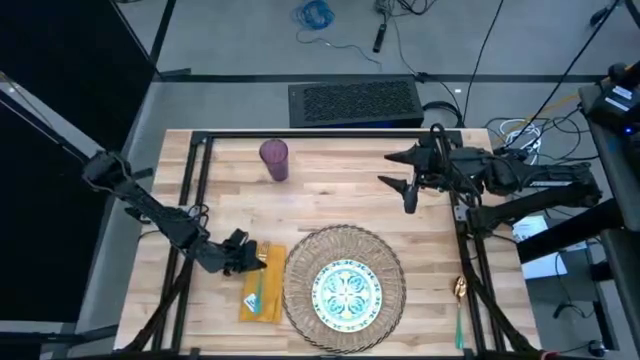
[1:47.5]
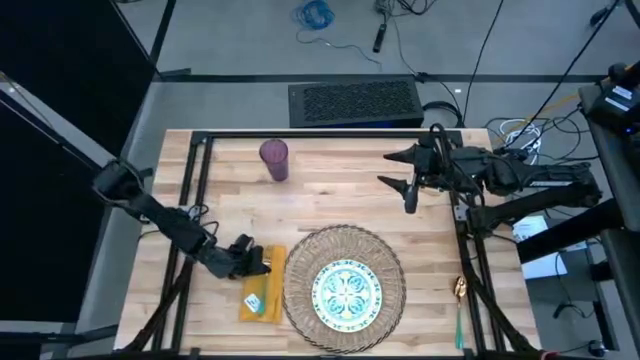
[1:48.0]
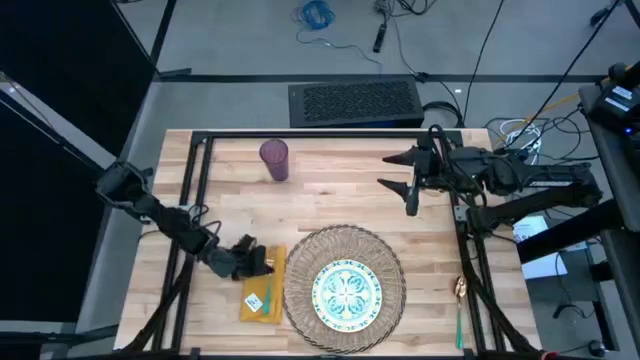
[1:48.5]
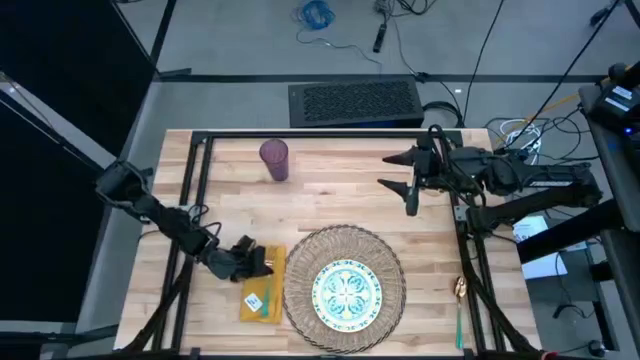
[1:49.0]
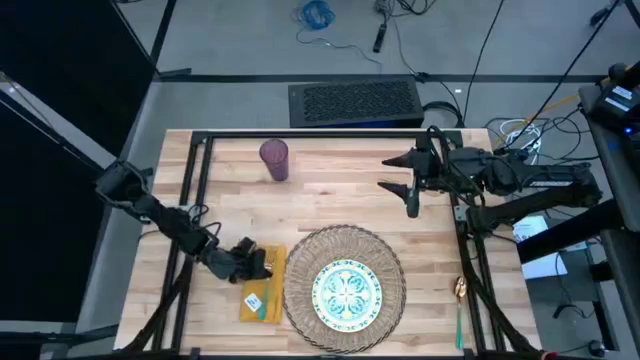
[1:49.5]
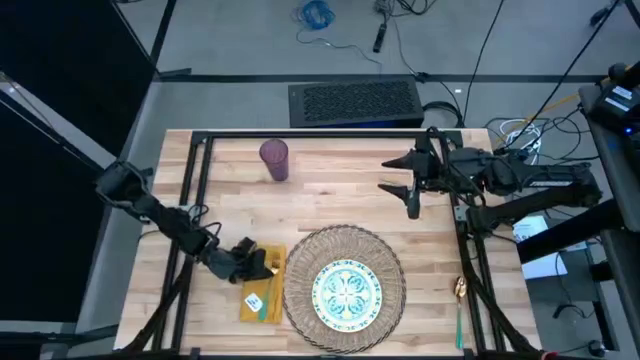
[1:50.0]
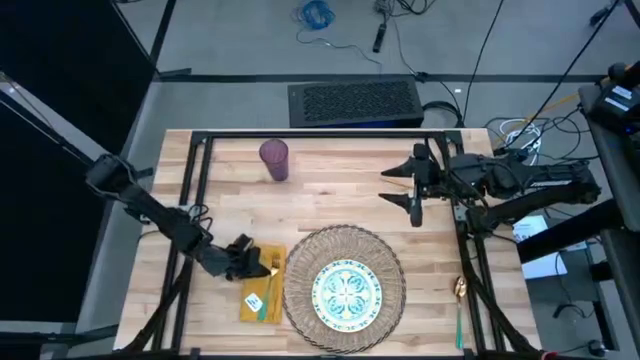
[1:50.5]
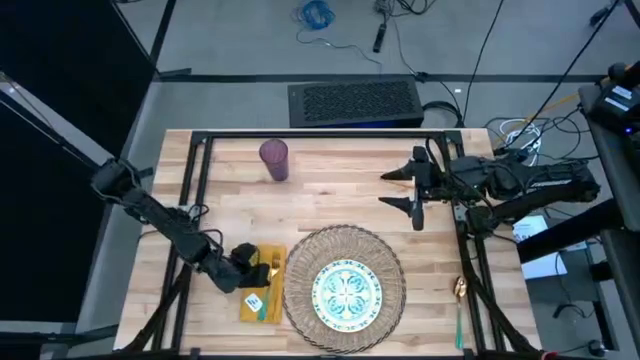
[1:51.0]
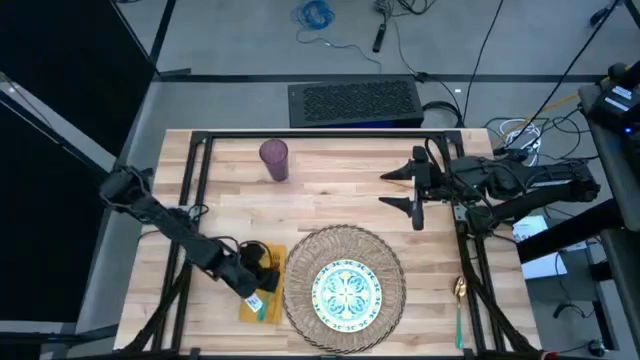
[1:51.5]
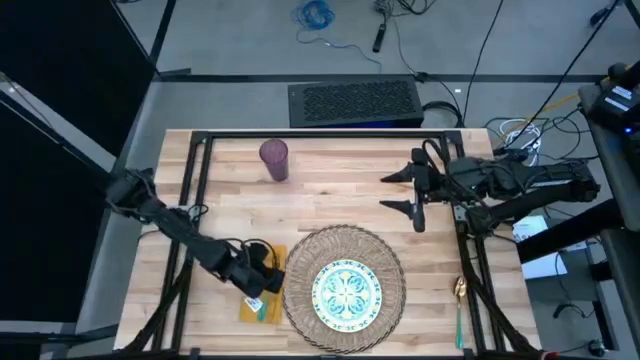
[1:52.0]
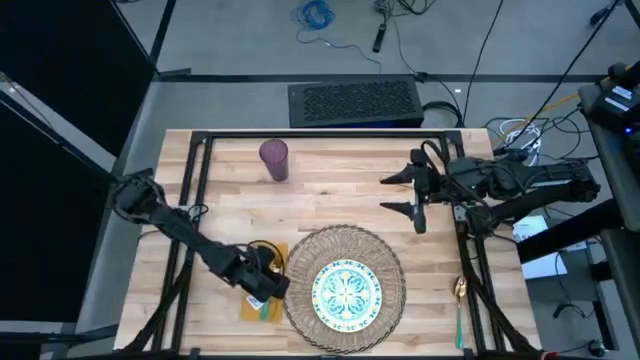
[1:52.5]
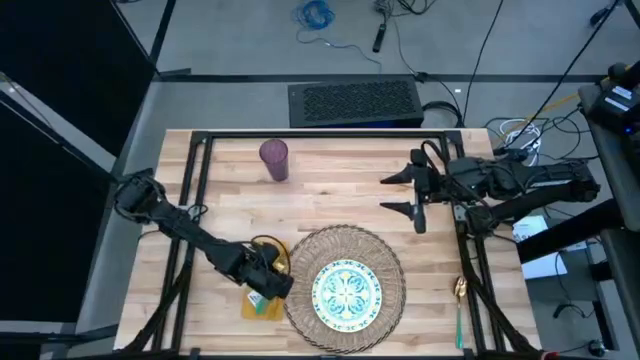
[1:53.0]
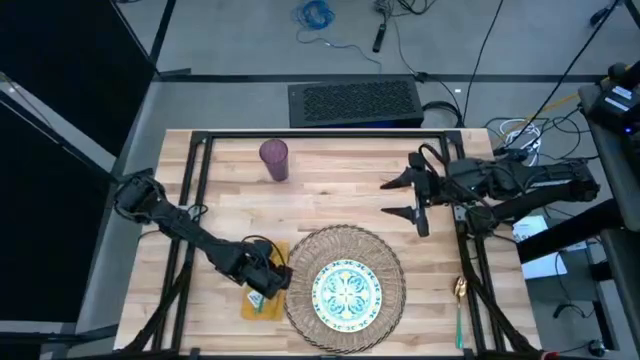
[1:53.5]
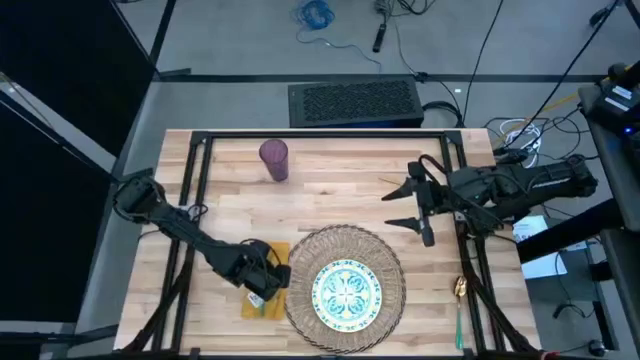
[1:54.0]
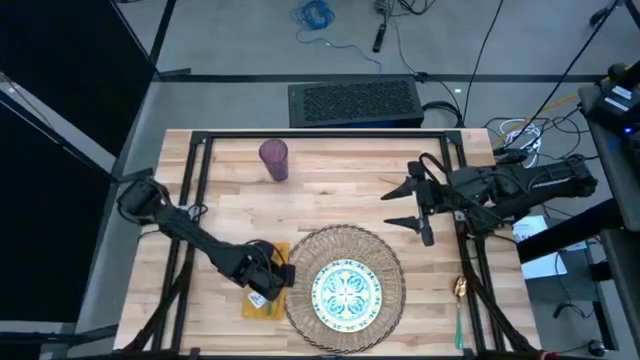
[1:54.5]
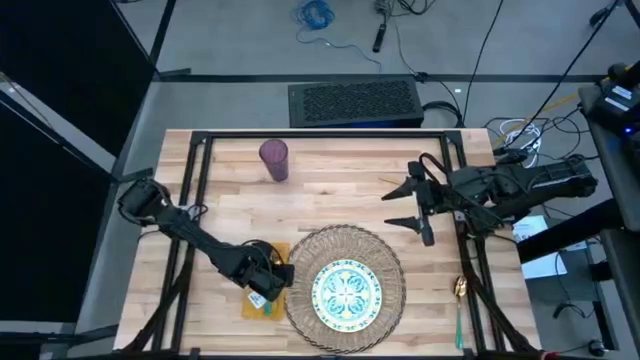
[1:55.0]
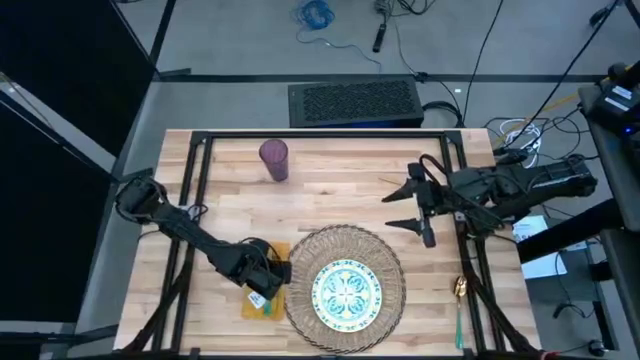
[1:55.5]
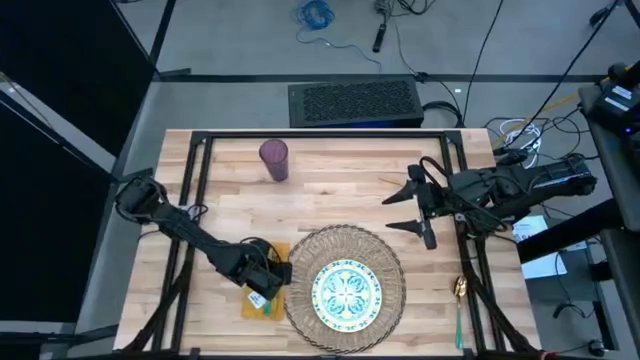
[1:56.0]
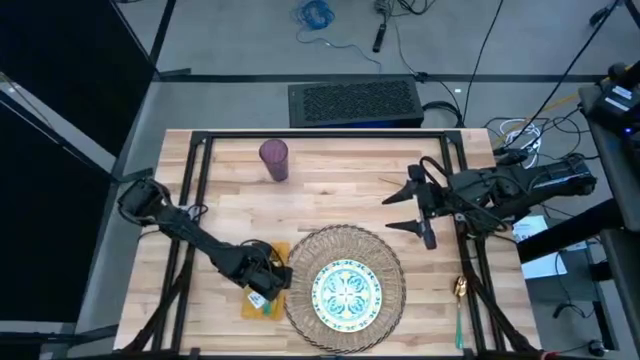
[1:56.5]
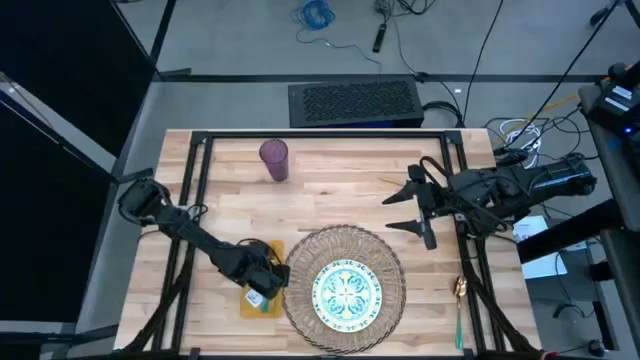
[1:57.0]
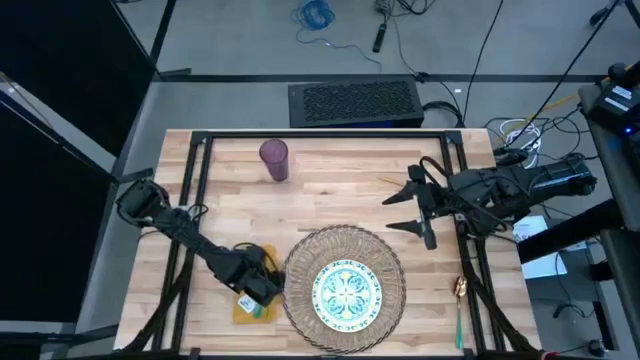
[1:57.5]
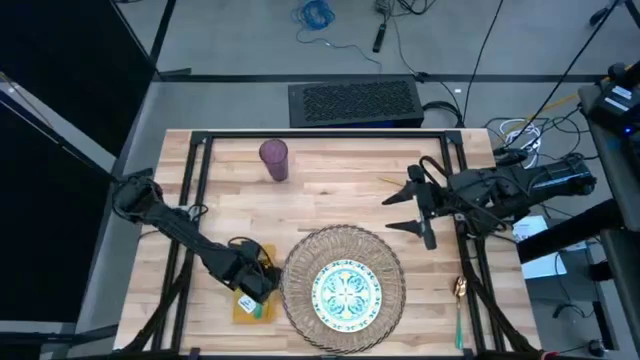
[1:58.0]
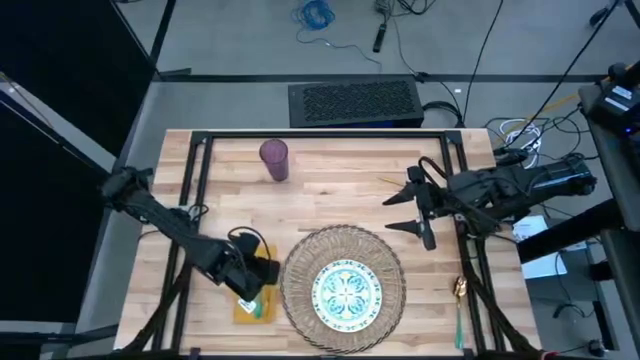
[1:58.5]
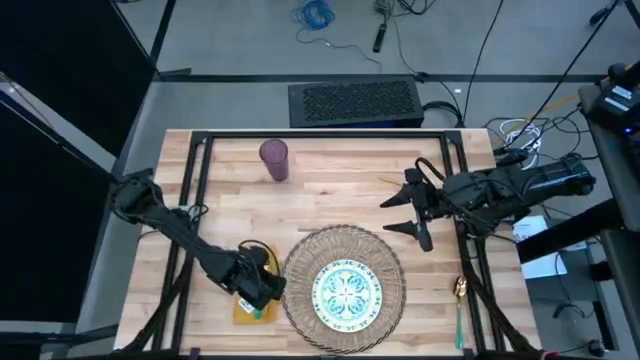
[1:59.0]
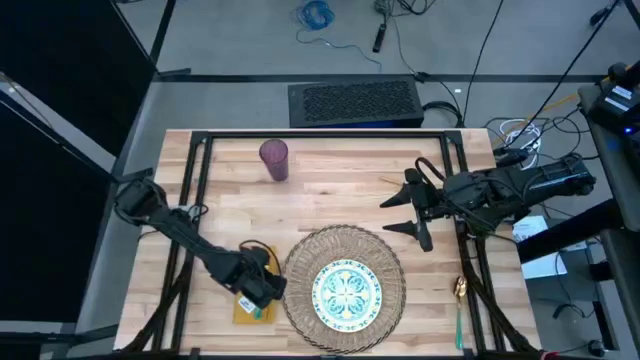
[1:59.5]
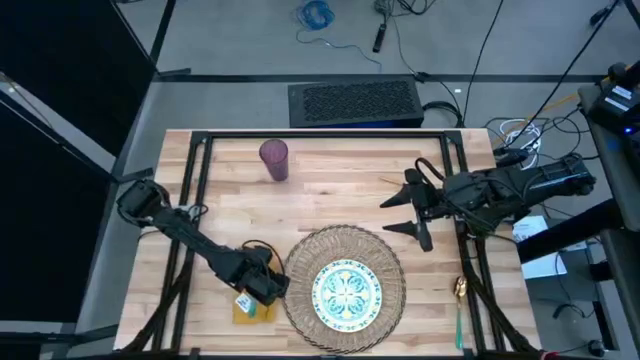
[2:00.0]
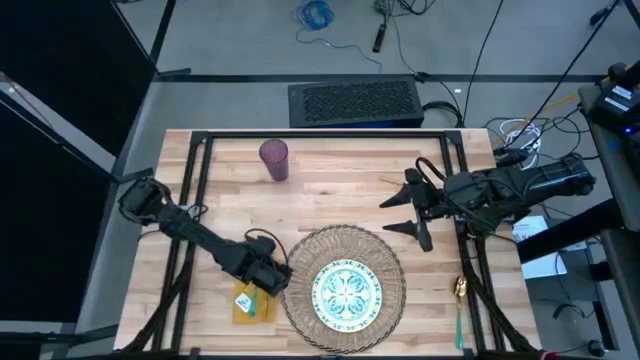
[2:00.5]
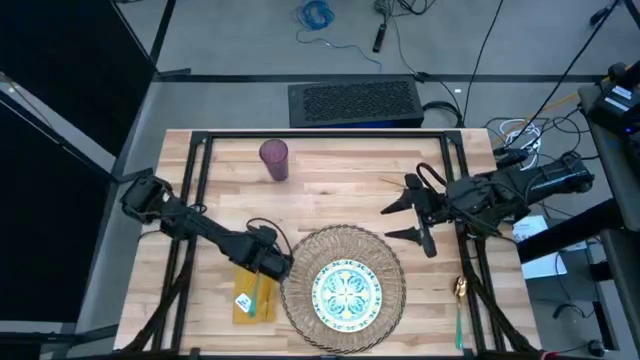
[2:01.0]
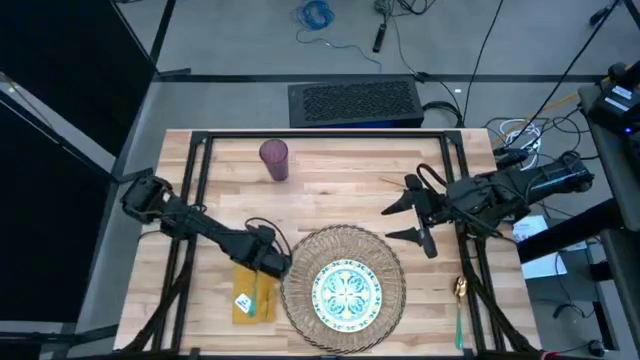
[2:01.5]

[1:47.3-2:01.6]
Task: Set table place
Put the green fork on the yellow table napkin

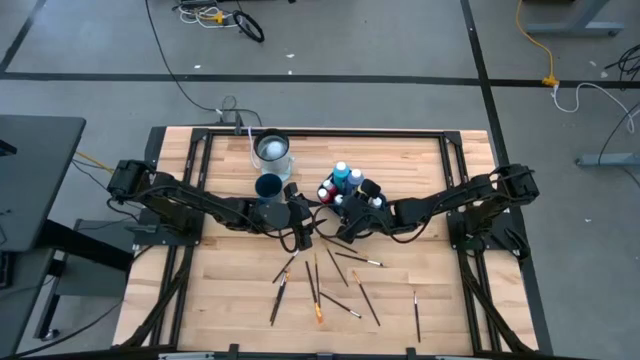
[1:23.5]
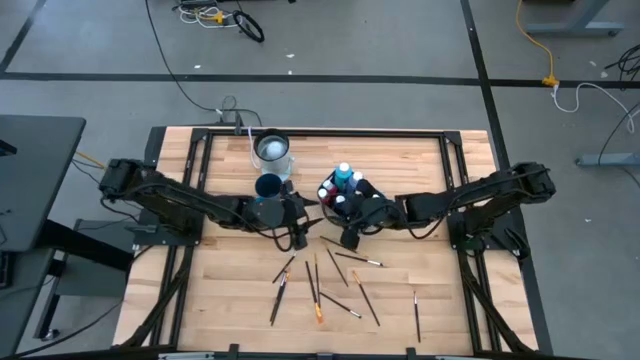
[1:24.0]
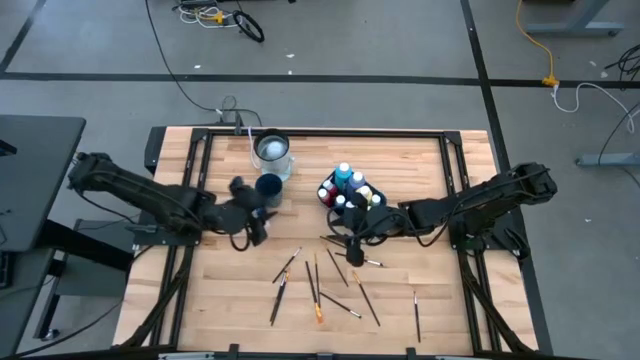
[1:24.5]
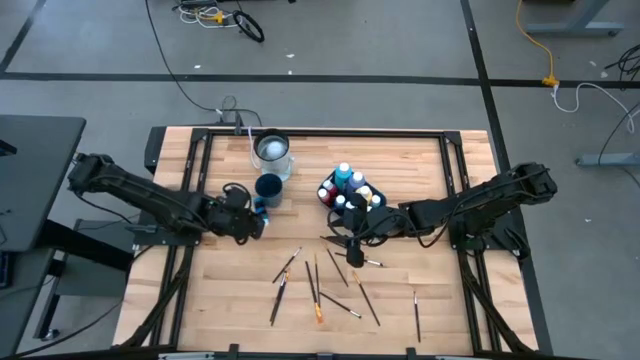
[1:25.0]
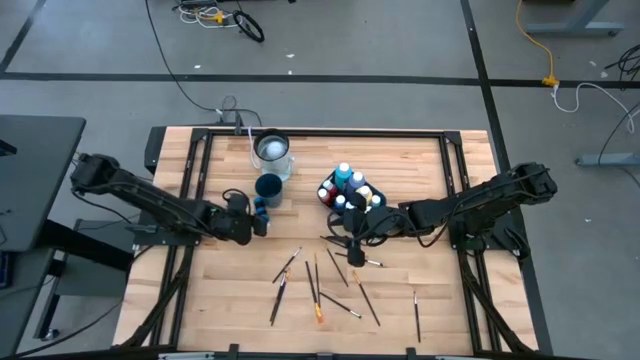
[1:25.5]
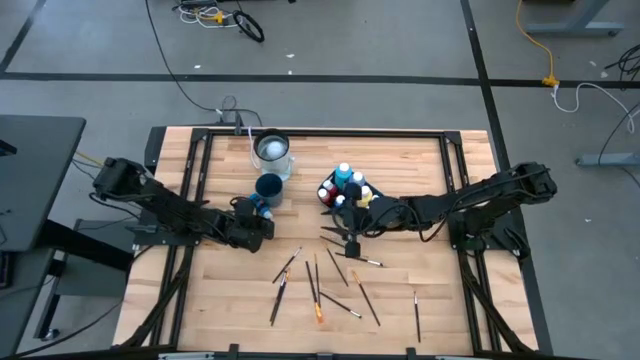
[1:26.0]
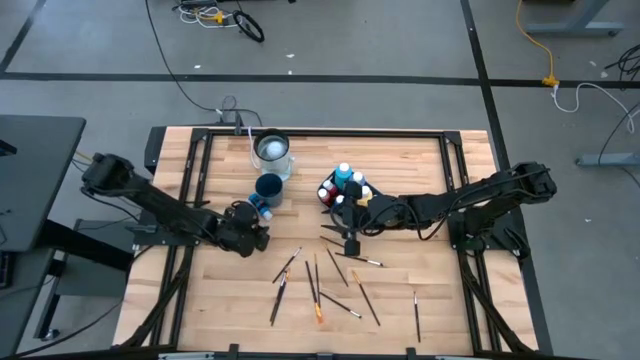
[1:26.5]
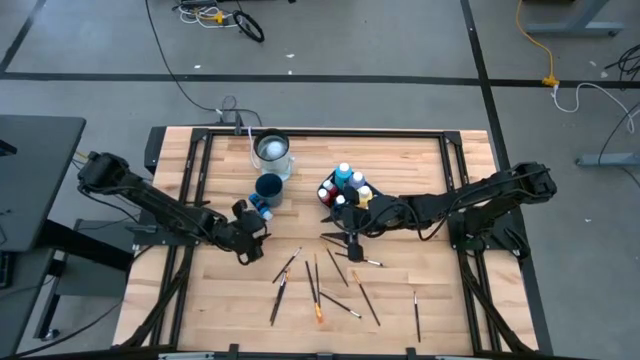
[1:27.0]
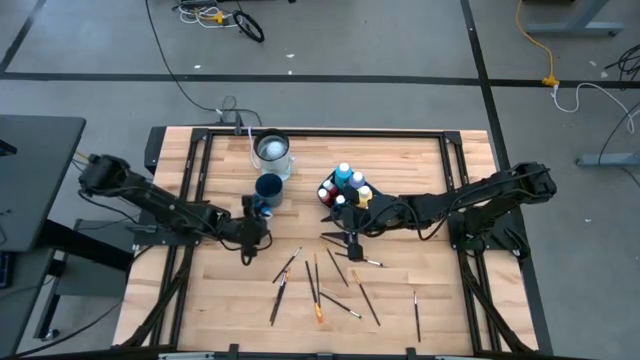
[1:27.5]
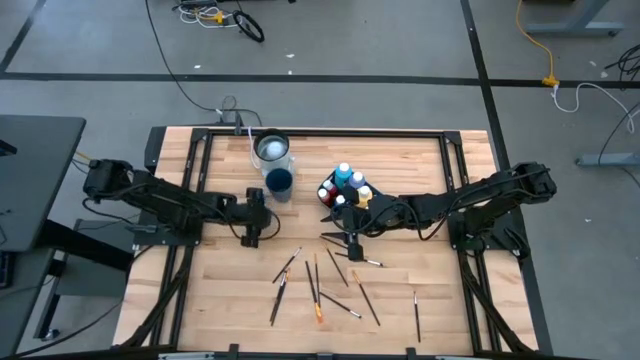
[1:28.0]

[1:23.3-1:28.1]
Task: Pick & Place Paint Supplies
Put the blue paint bottle into the blue bin
